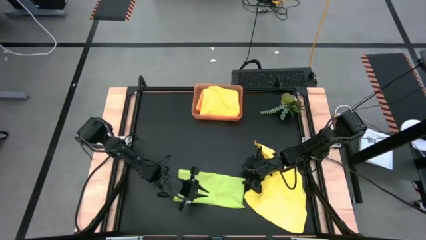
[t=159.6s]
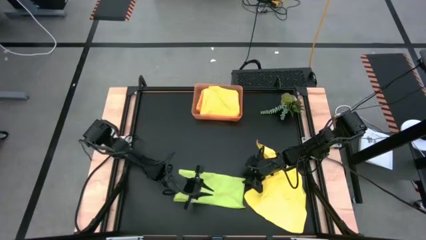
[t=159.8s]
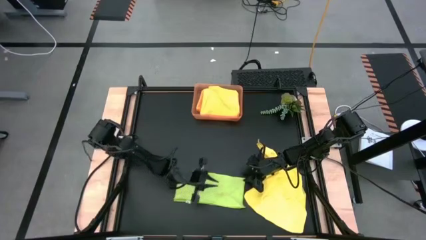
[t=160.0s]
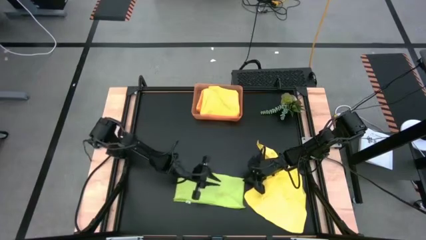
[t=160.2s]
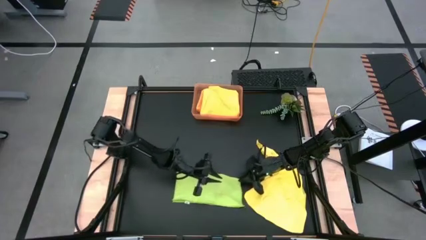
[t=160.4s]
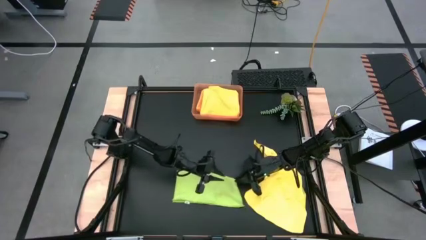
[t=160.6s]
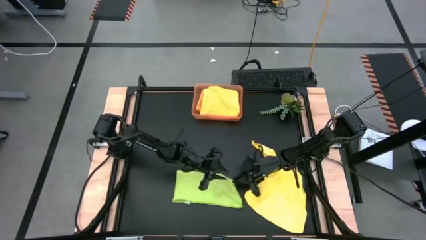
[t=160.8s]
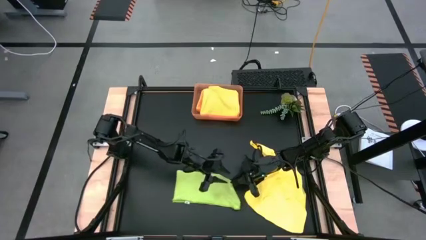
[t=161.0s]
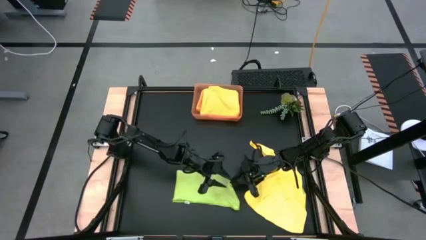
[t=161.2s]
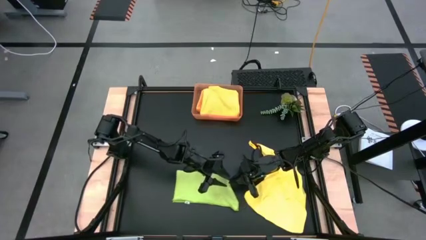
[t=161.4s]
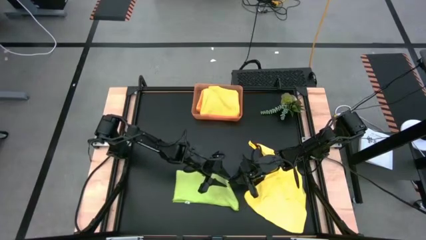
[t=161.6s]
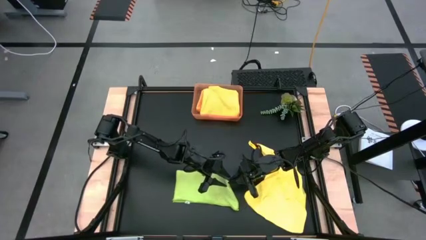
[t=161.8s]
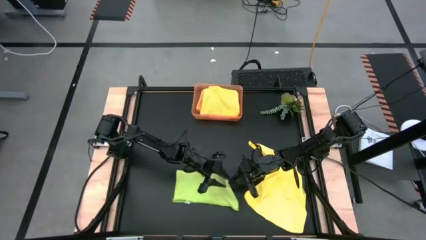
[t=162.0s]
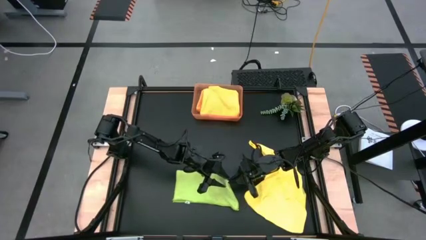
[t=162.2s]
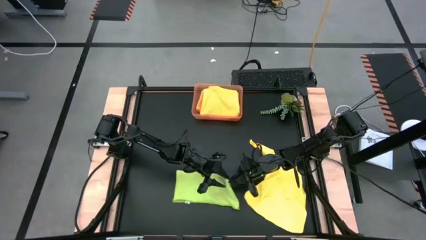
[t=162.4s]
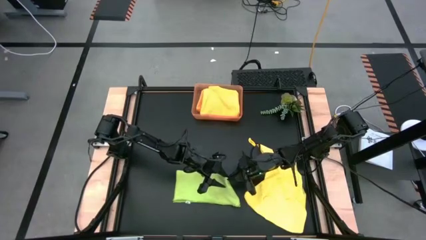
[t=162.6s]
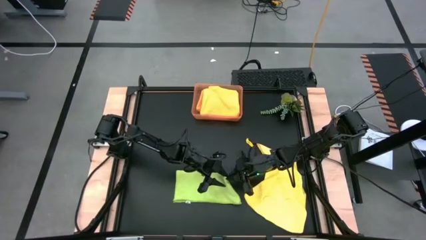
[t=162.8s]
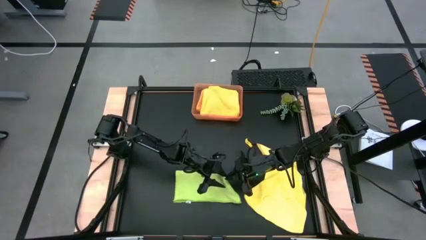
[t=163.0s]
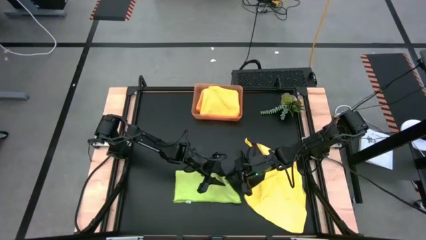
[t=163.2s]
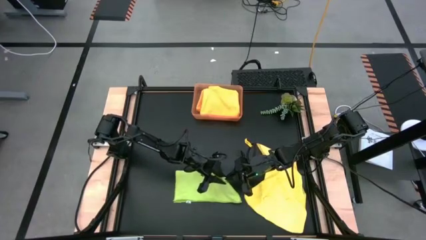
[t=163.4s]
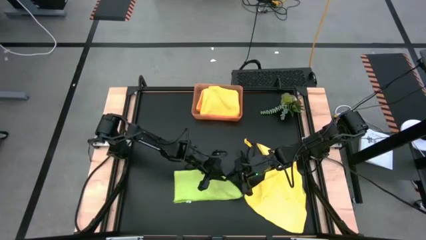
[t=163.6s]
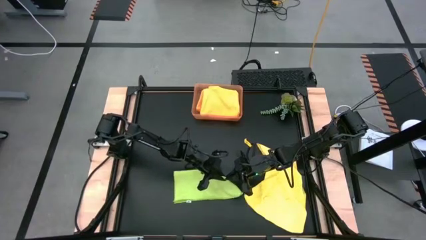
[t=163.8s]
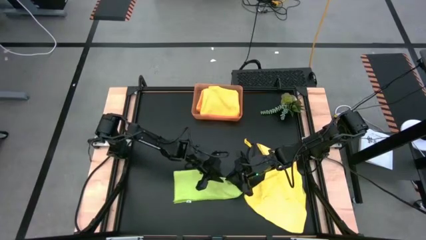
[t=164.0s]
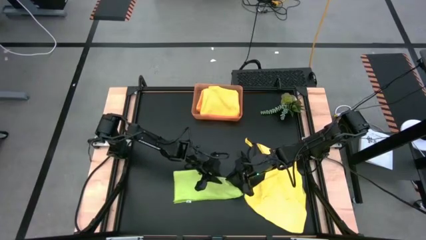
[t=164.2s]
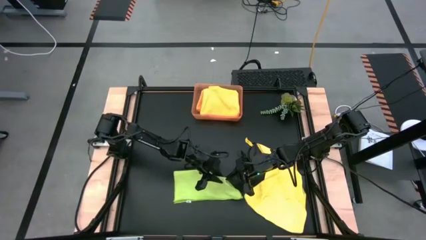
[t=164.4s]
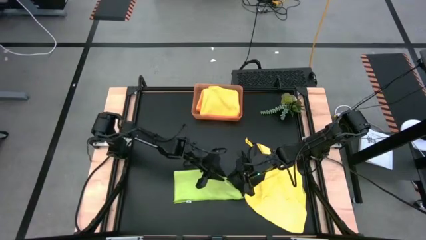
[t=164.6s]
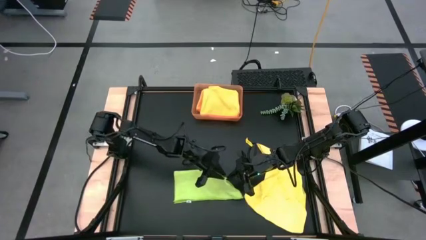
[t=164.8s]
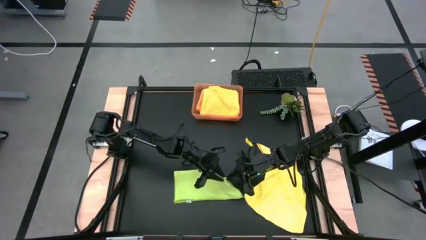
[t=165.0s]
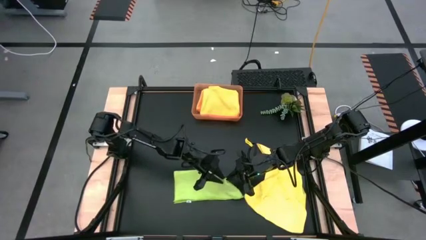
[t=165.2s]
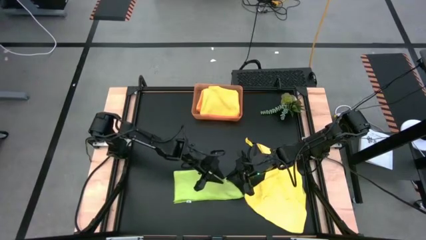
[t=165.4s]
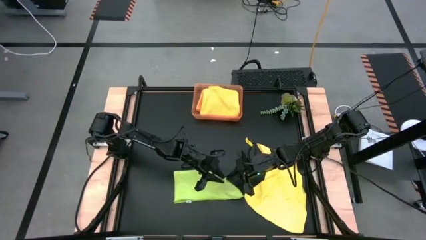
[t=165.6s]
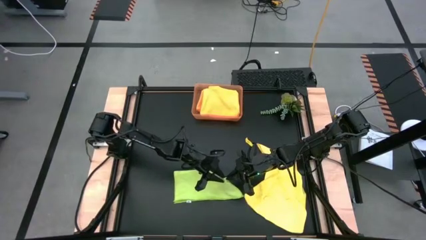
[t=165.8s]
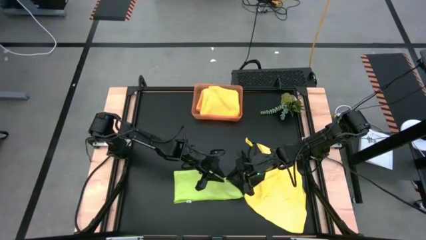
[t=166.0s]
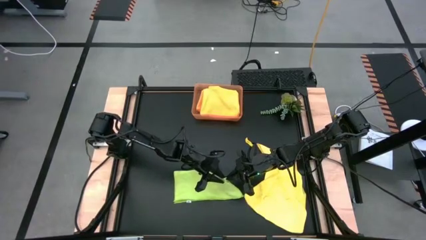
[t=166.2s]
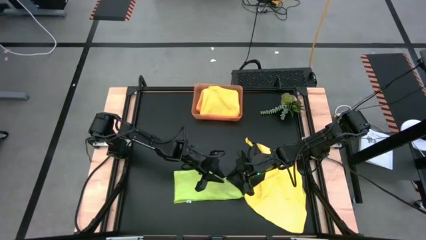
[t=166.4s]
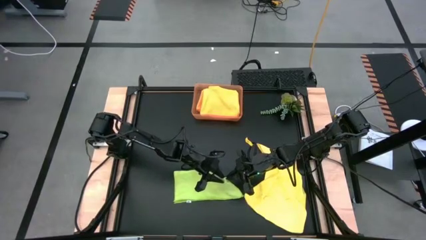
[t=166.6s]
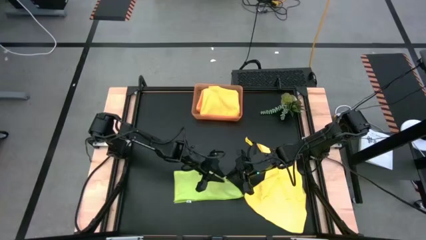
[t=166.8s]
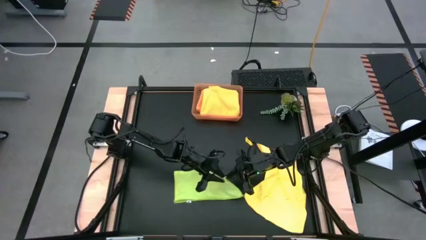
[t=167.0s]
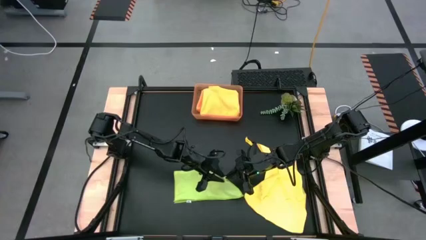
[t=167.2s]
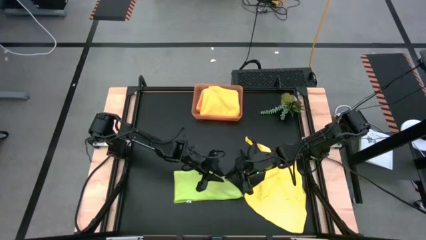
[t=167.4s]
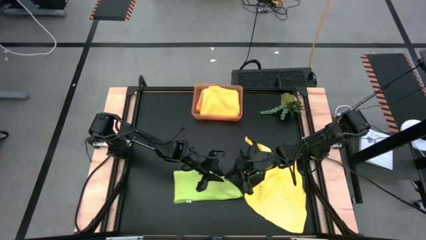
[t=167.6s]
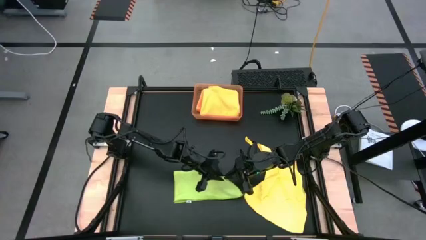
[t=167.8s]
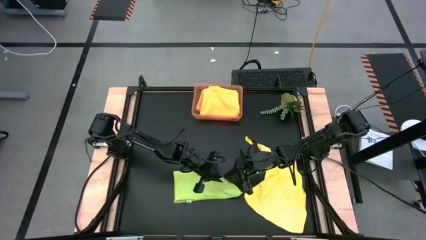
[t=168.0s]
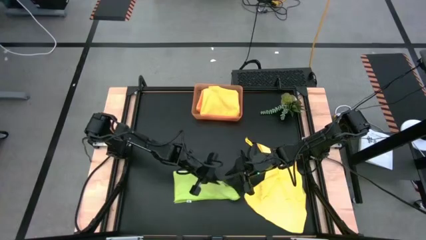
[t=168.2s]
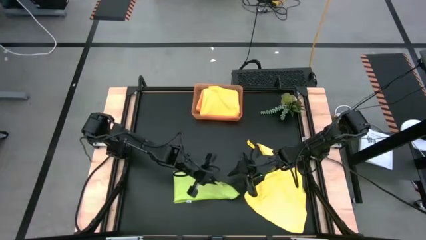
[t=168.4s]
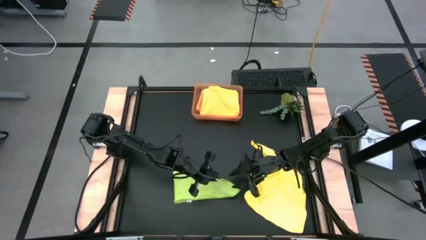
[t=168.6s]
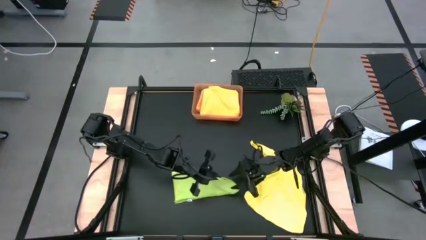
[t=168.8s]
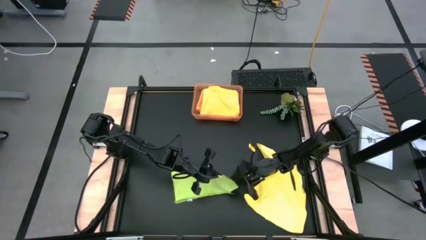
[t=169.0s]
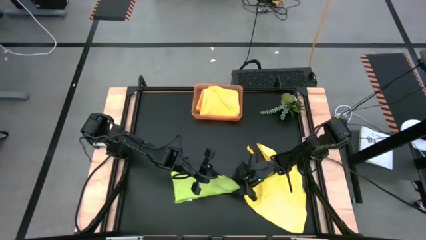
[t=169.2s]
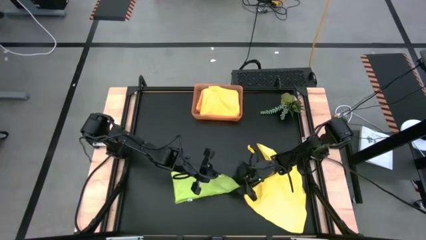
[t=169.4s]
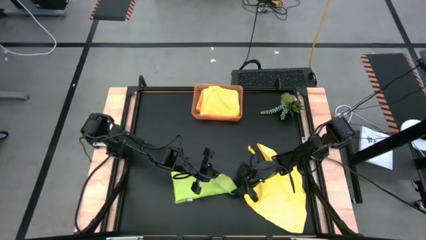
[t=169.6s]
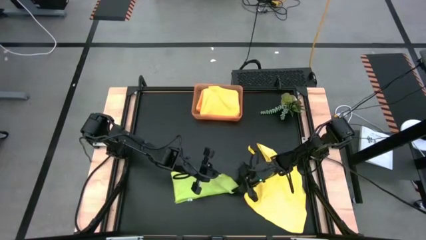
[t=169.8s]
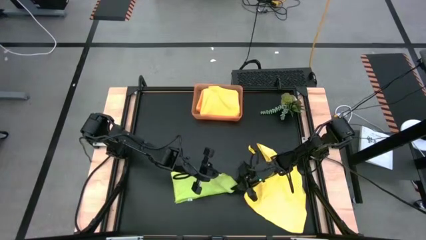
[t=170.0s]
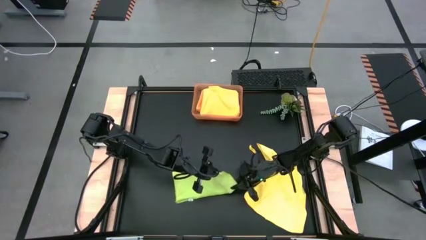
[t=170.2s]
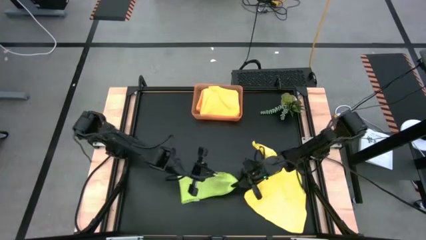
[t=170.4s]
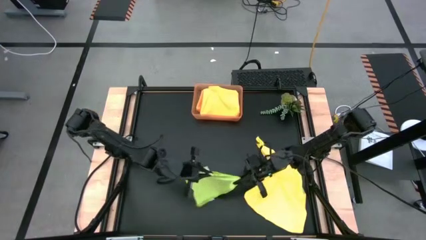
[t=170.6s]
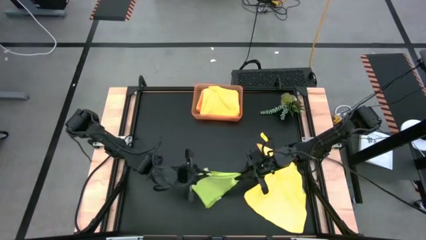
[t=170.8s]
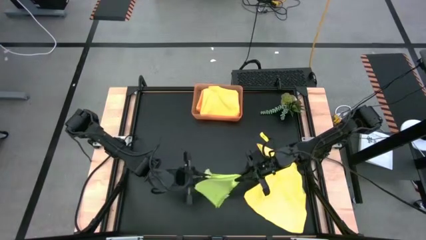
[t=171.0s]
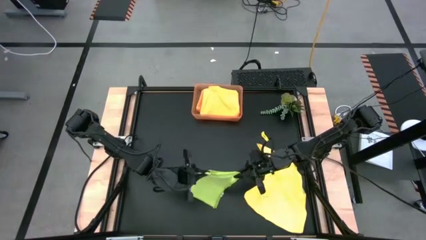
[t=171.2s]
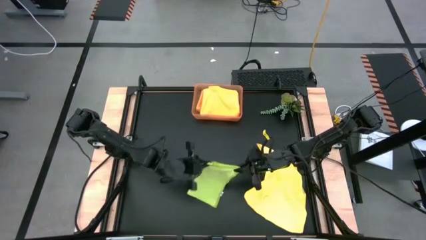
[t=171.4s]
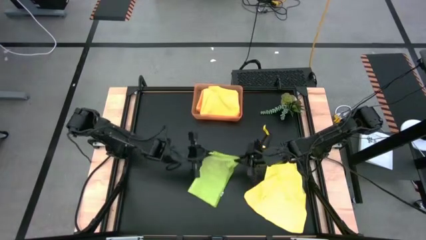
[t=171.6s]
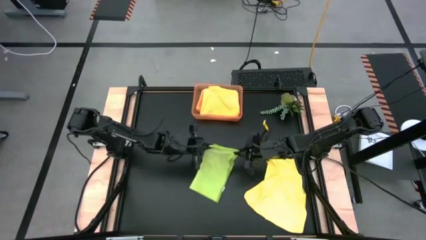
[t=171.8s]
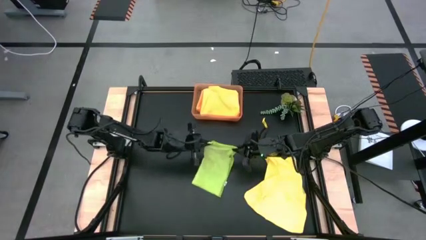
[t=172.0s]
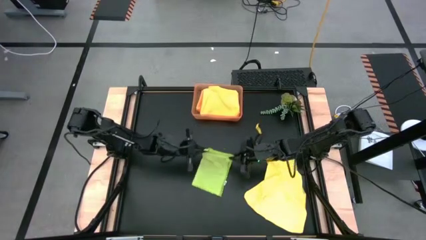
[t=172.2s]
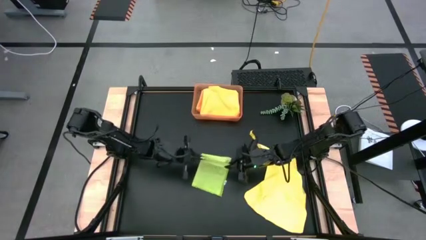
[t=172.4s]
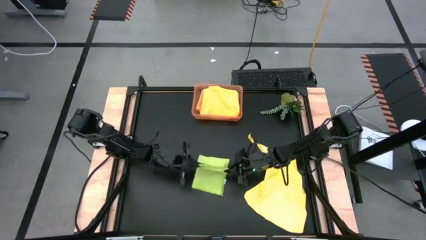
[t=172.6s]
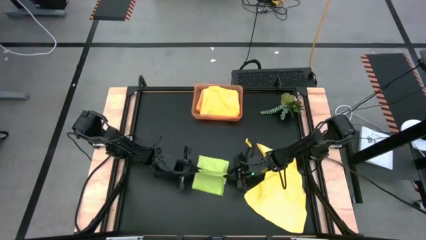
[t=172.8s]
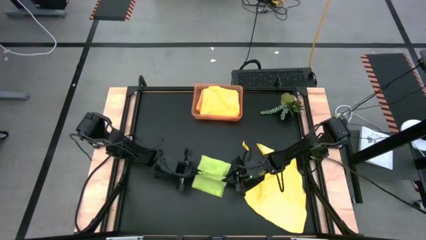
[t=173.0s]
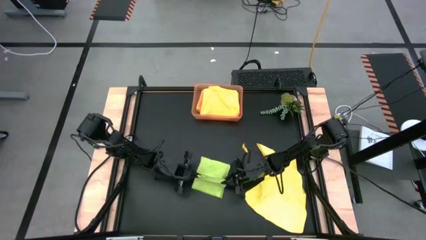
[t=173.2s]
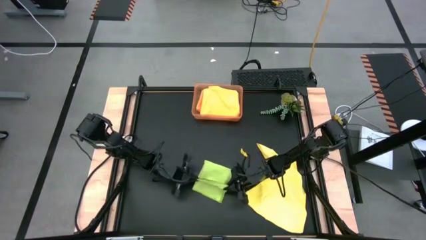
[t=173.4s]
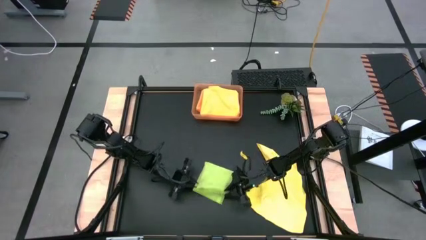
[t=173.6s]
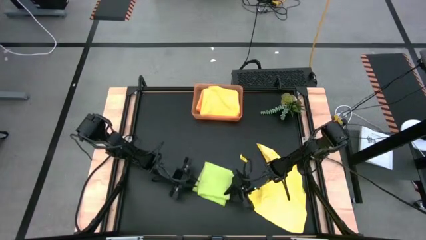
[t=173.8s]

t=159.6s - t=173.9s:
Task: Fold microfiber towels
Fold the green towel
